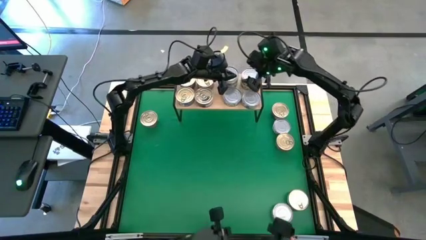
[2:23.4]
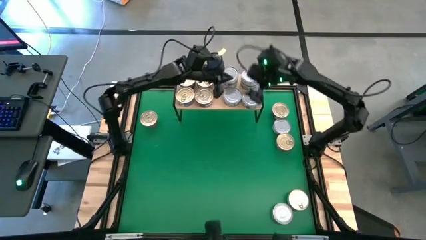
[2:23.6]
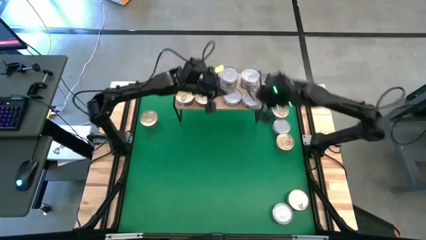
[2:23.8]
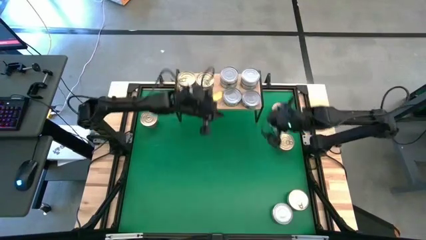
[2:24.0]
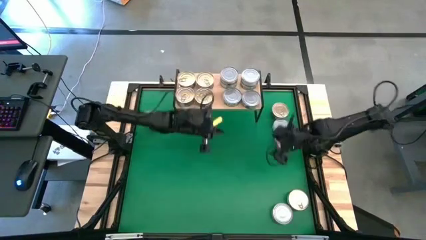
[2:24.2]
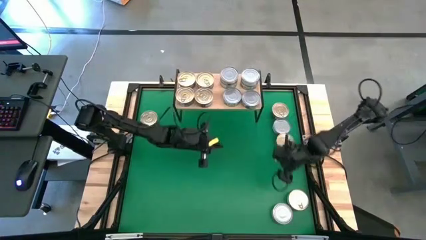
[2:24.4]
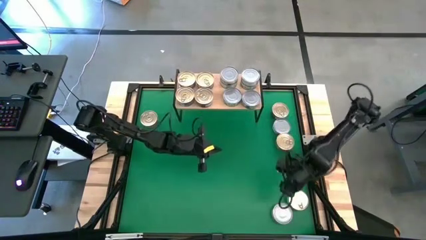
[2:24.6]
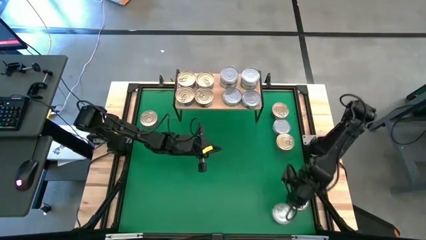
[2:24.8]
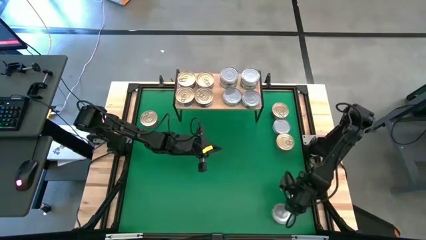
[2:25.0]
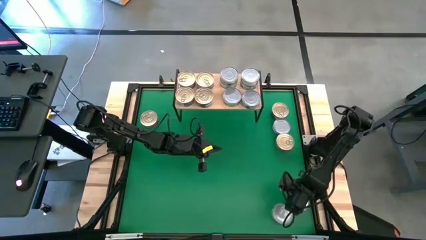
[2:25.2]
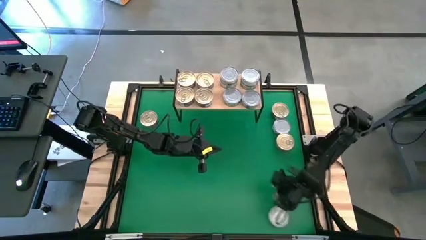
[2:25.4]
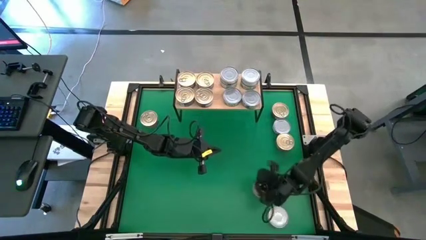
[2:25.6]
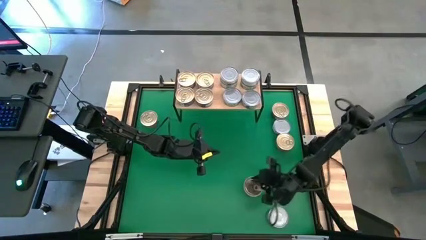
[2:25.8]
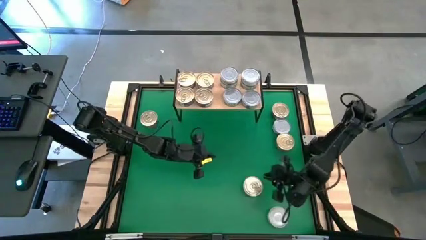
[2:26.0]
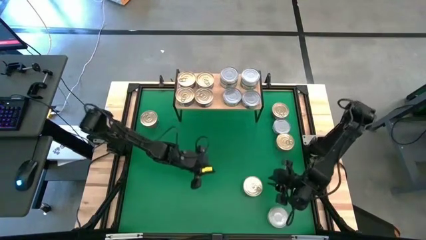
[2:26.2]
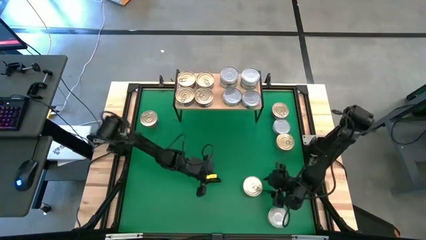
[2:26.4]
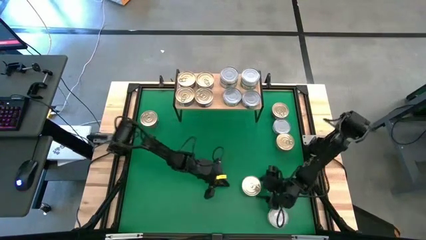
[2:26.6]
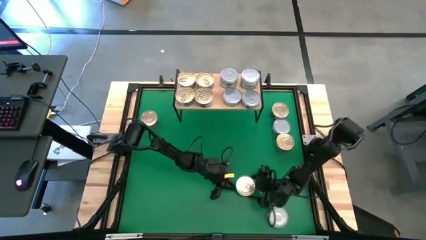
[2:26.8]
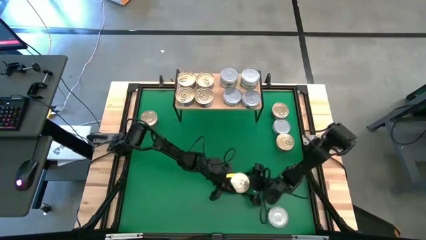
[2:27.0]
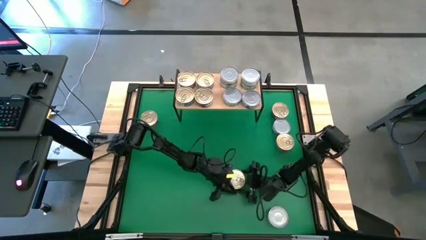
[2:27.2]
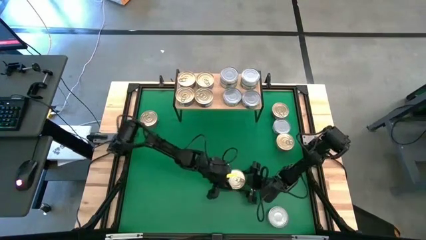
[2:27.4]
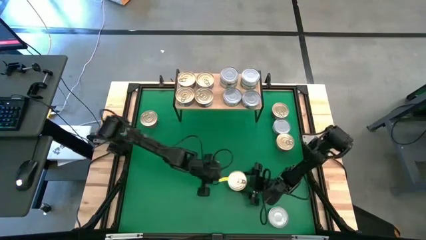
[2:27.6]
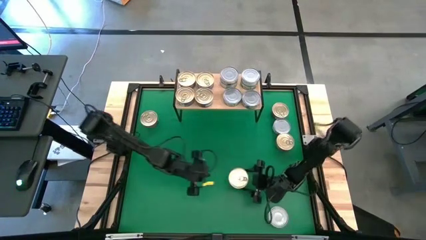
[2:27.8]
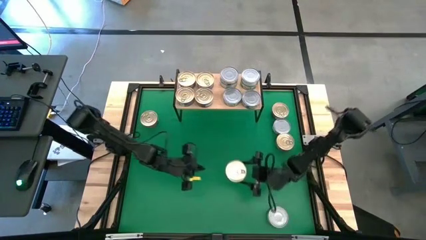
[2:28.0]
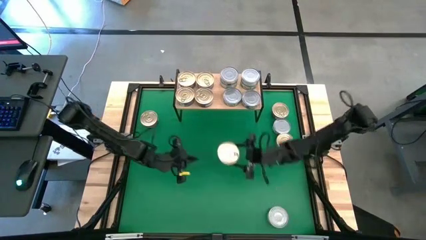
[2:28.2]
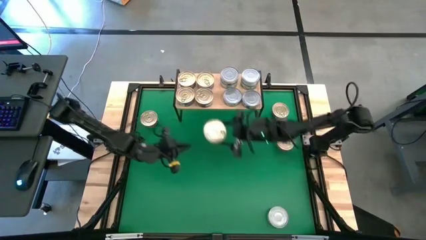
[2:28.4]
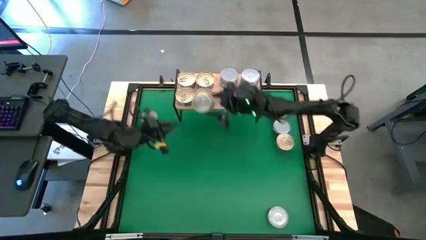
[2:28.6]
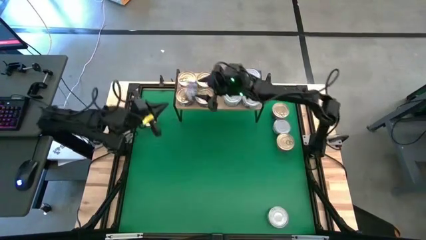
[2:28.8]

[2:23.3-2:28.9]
Task: Stack canned seafood by type on shelf
Stack the blue tuna can on top of the other blue tuna can on the shelf

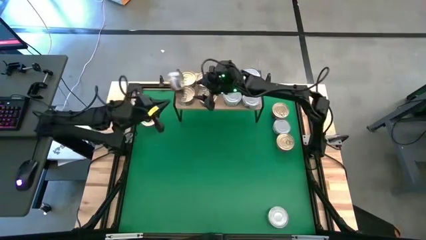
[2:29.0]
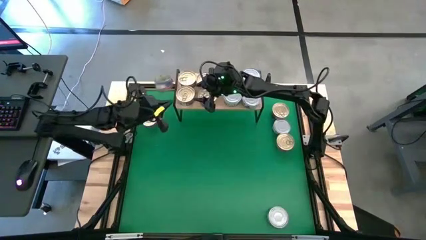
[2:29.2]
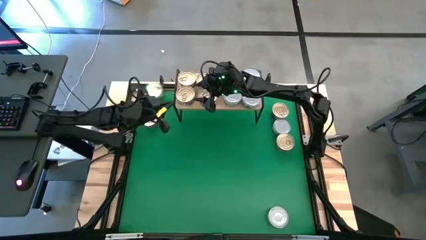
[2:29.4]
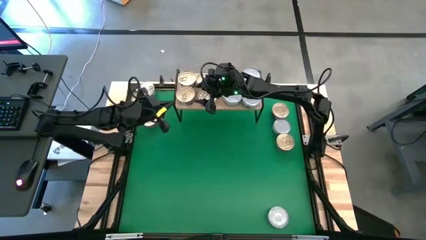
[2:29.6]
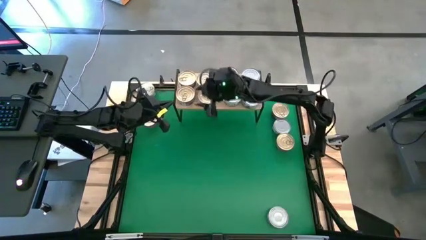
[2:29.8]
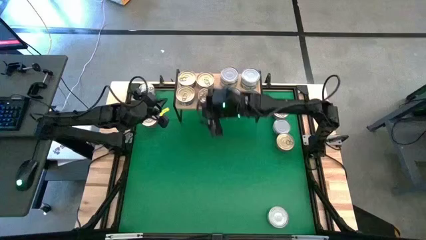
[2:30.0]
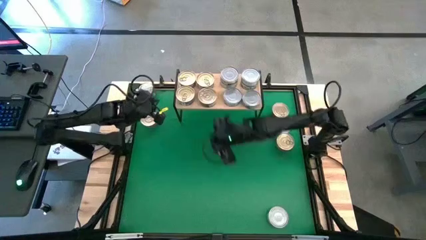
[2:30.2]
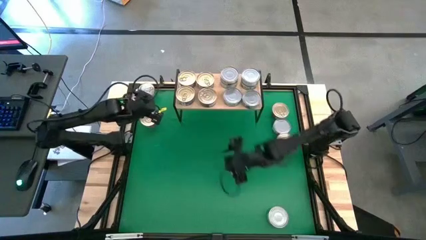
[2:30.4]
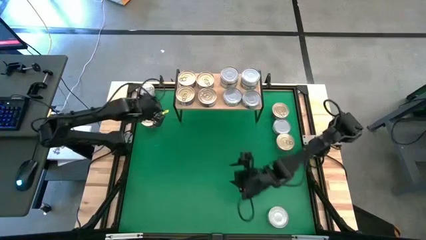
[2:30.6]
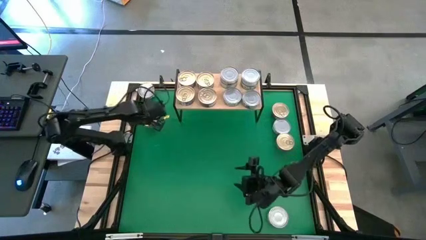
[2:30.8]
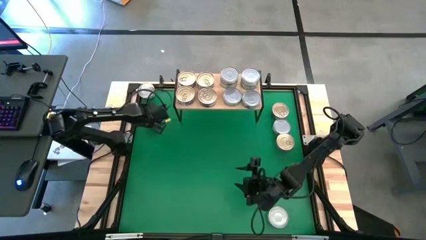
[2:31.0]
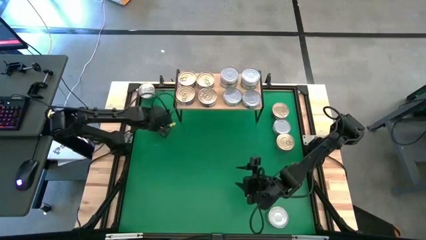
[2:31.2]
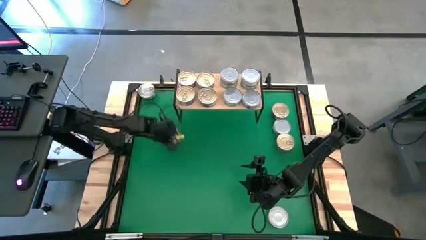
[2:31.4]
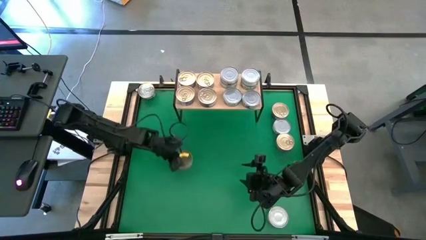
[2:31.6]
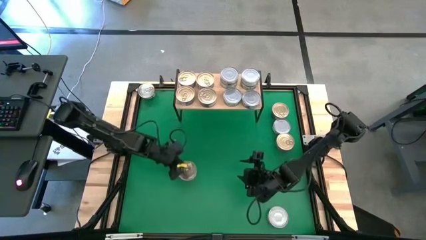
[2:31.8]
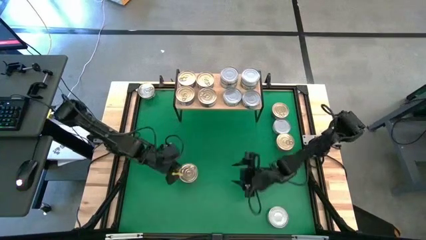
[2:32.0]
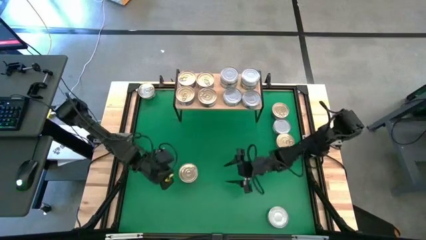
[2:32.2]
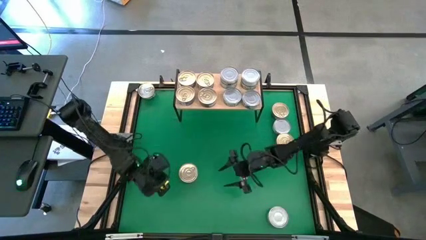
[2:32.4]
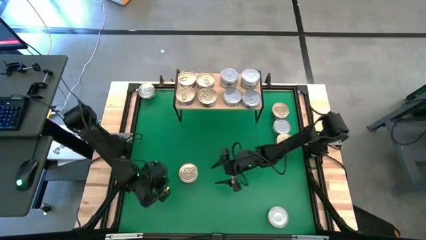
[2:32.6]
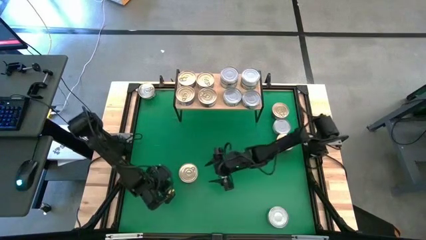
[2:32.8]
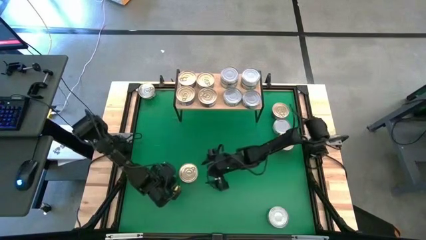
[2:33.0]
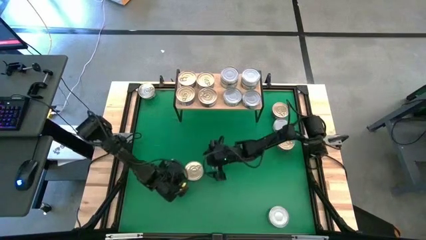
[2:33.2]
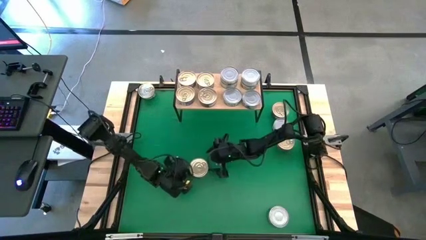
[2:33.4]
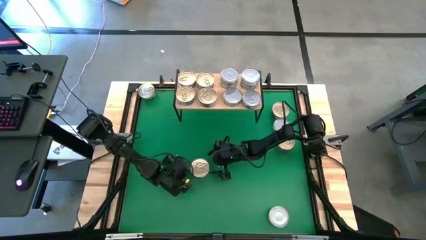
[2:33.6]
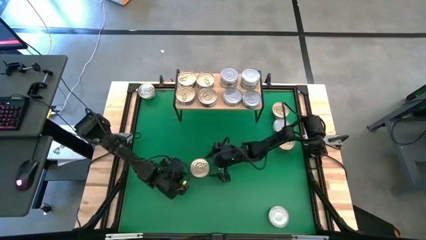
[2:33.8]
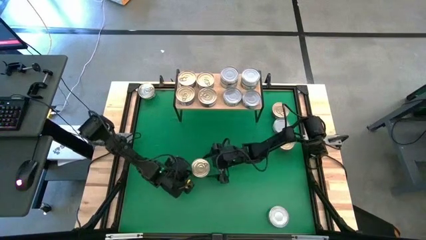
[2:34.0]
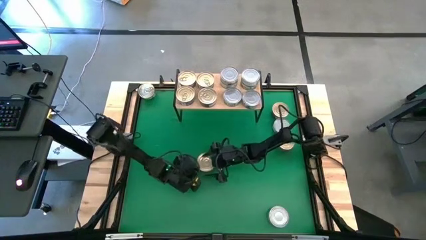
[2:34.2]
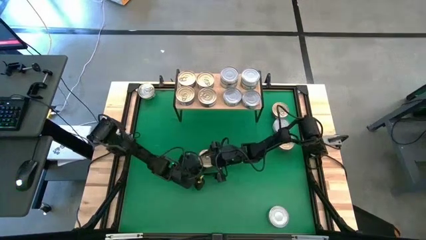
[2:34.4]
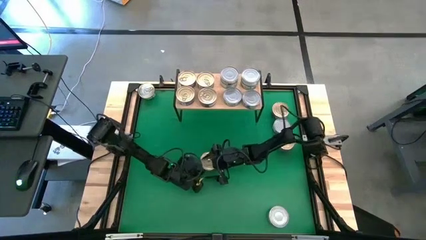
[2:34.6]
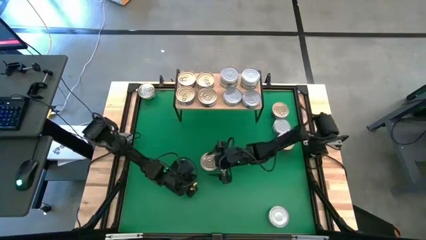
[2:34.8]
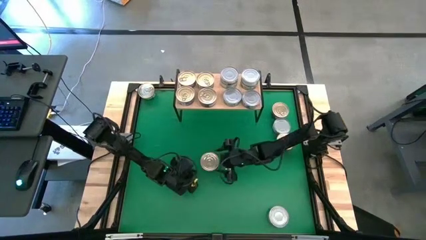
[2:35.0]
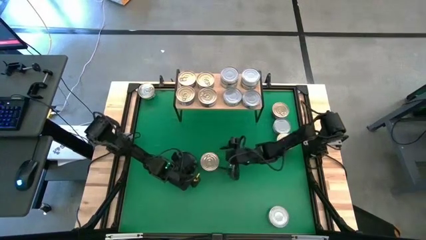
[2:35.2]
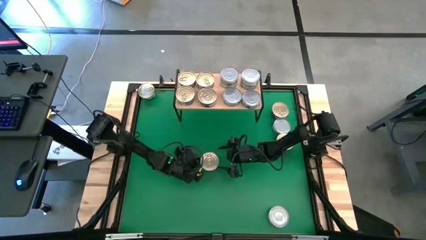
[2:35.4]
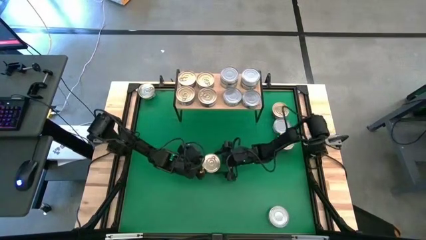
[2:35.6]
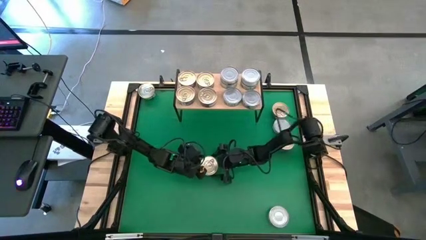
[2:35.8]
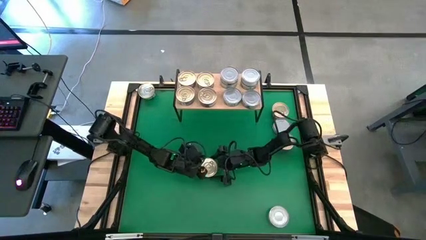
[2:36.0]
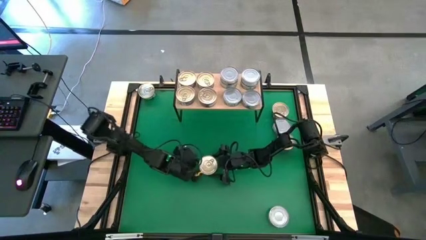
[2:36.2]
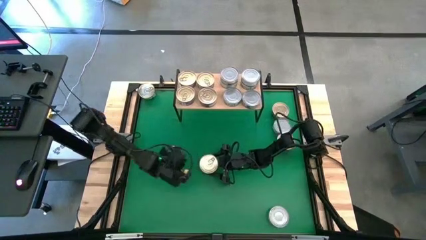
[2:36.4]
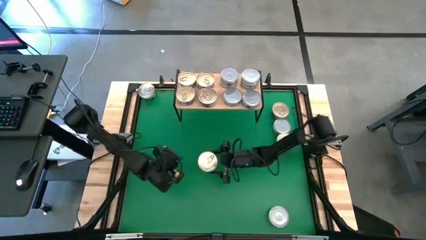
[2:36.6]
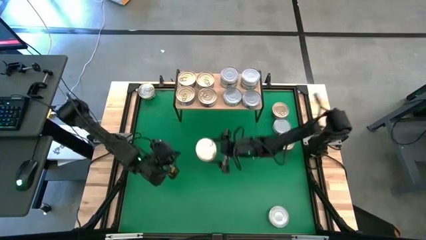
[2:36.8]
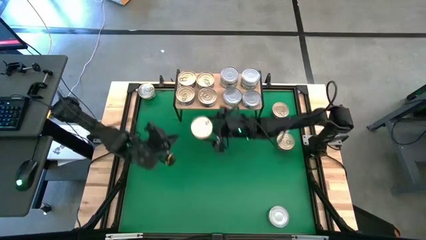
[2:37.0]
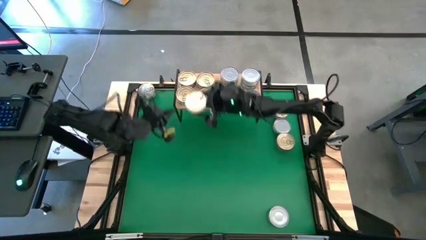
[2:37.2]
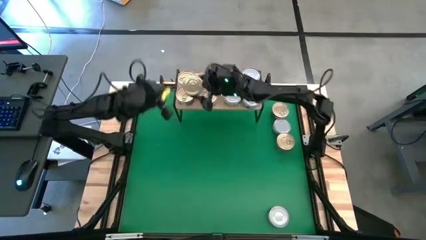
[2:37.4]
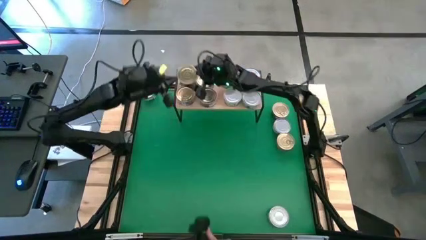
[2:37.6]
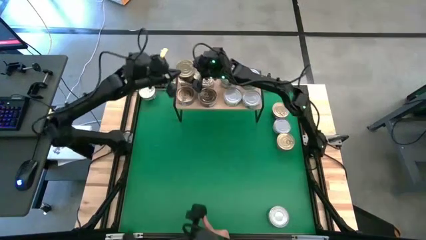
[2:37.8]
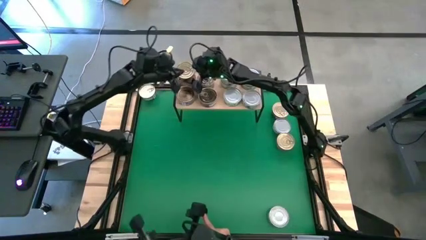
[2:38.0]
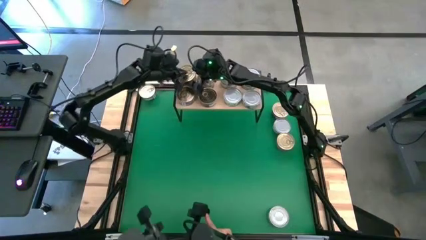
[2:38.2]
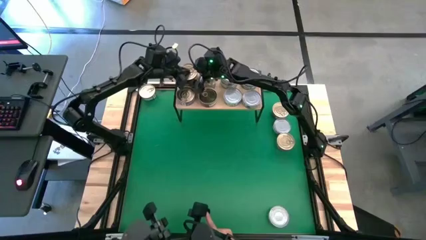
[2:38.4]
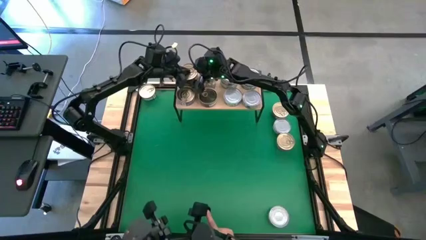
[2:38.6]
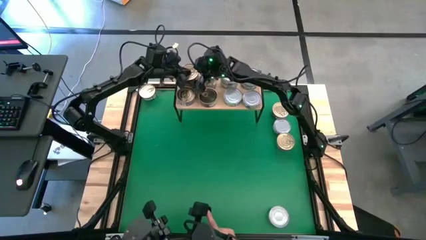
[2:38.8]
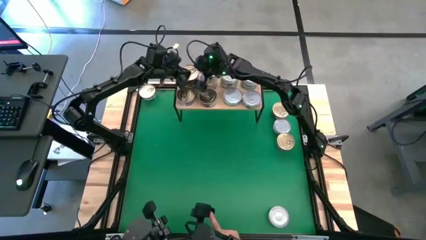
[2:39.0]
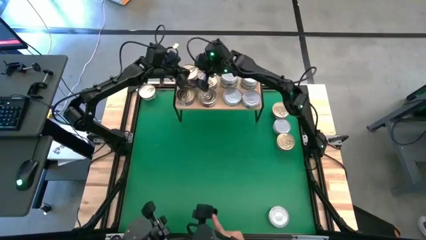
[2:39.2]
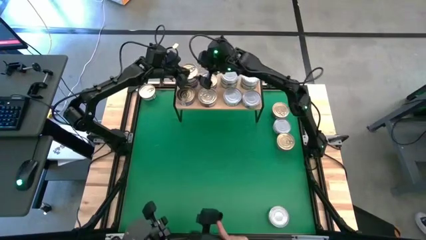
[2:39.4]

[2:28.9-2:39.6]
Stack the blue tuna can on top of the other blue tuna can on the shelf

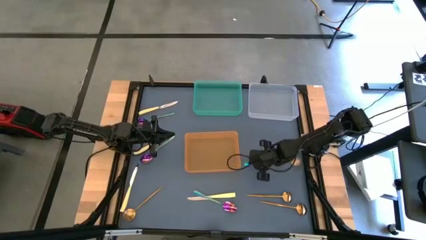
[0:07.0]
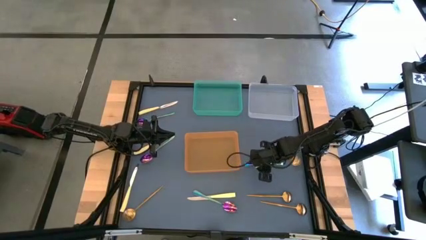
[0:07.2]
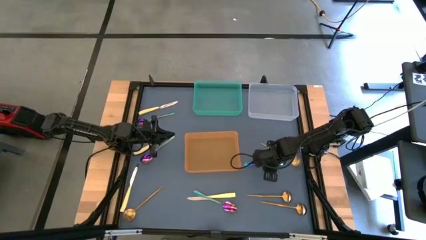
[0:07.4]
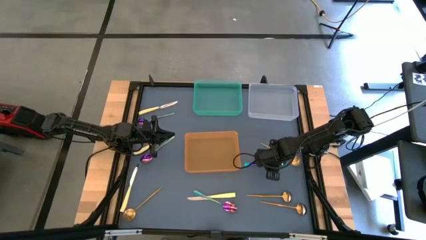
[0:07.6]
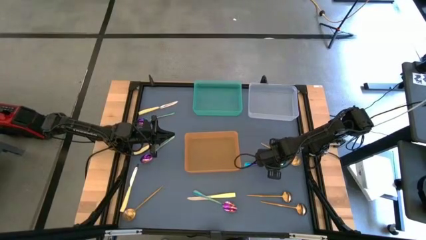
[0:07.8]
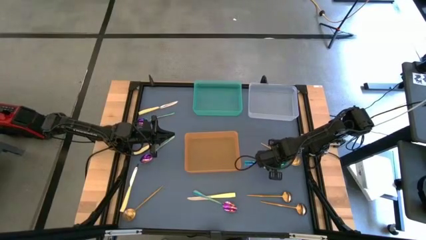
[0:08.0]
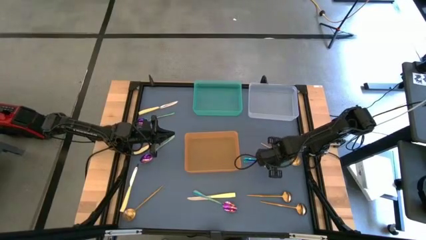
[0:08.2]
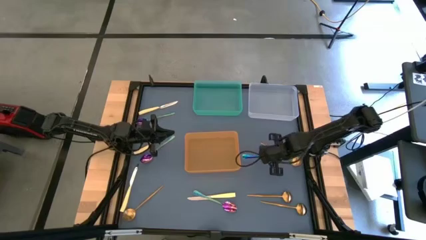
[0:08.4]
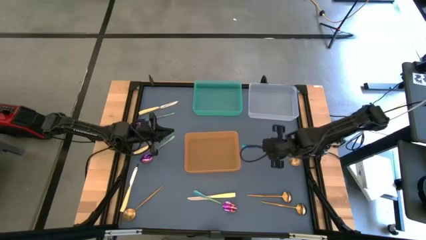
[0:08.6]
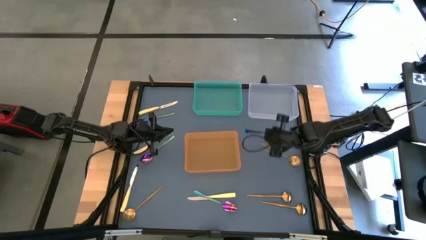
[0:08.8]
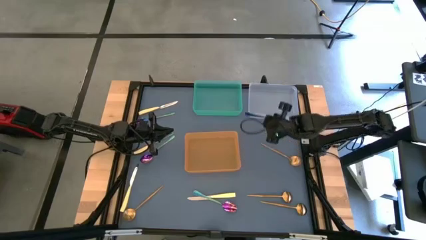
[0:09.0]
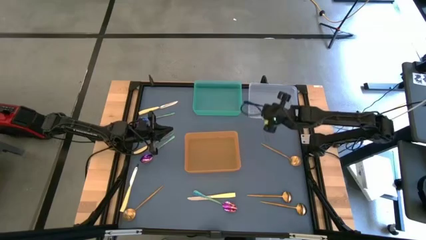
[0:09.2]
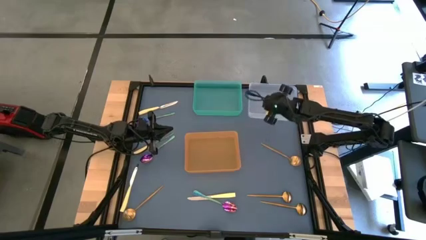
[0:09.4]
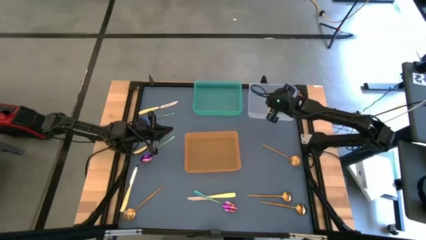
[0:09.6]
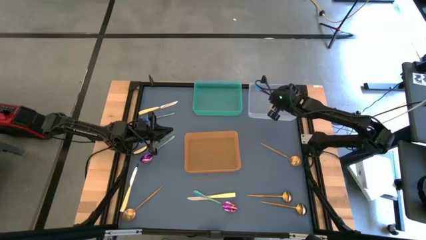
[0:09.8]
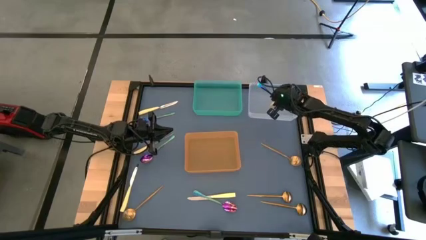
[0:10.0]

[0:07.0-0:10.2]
Task: Sort silverware by color (type)
Put the blue spoon into the transparent bin
